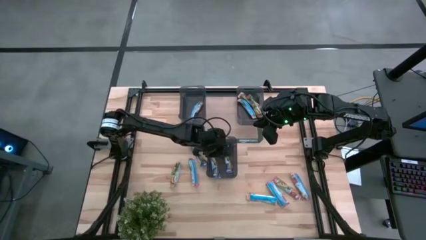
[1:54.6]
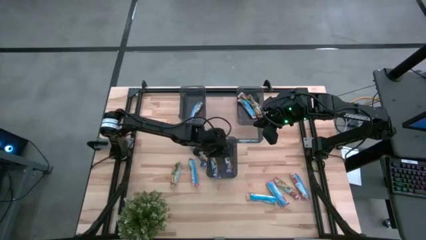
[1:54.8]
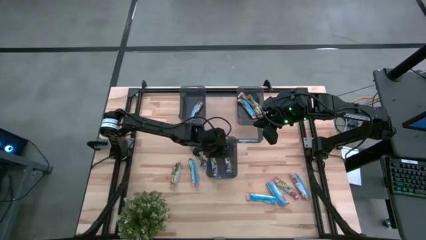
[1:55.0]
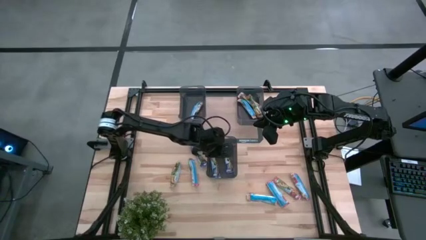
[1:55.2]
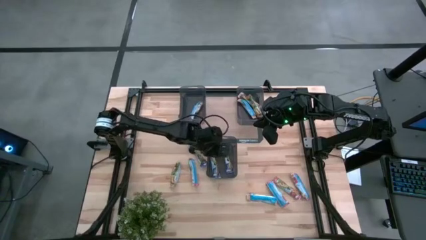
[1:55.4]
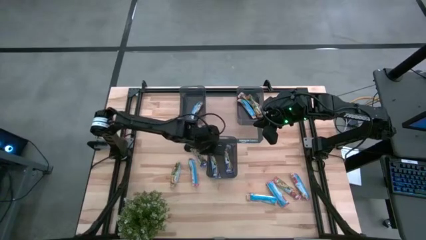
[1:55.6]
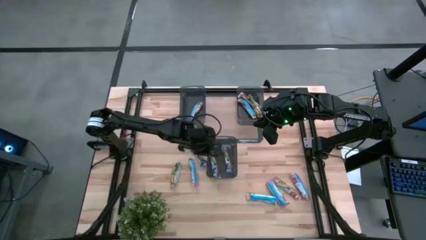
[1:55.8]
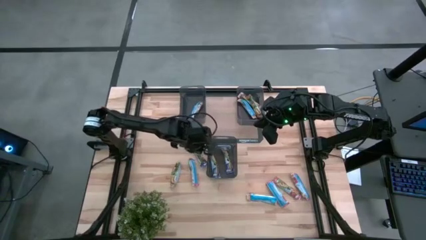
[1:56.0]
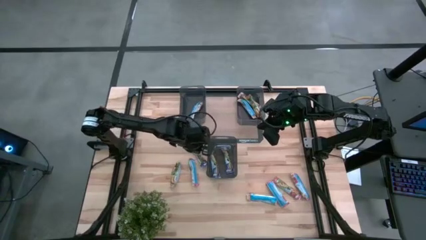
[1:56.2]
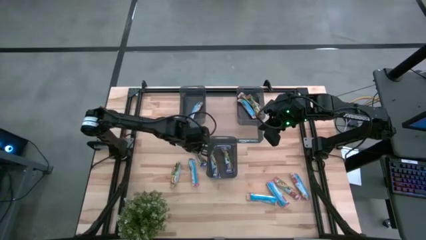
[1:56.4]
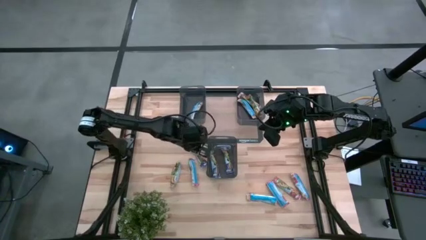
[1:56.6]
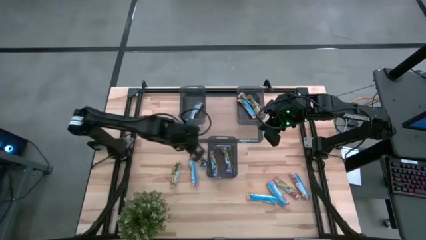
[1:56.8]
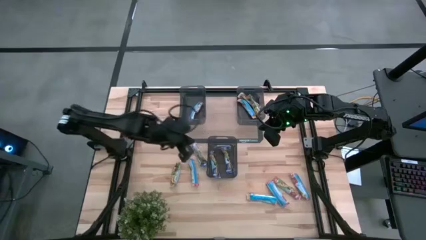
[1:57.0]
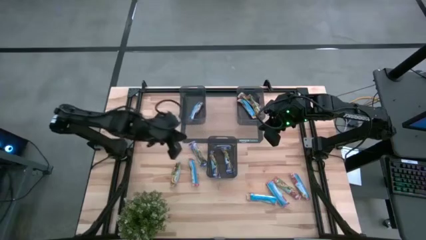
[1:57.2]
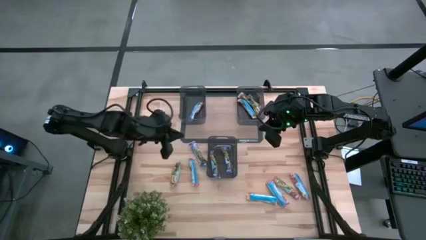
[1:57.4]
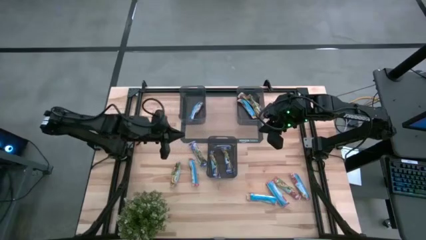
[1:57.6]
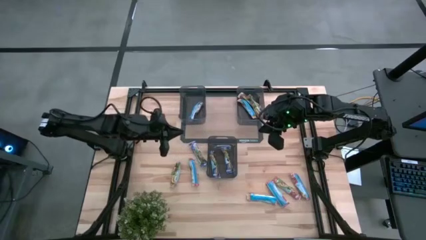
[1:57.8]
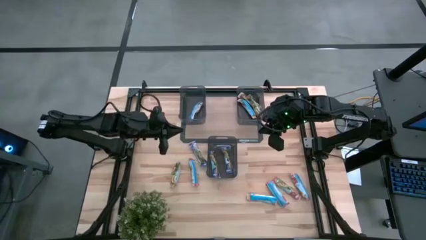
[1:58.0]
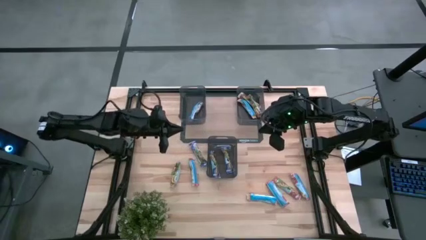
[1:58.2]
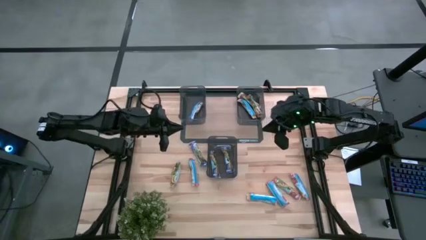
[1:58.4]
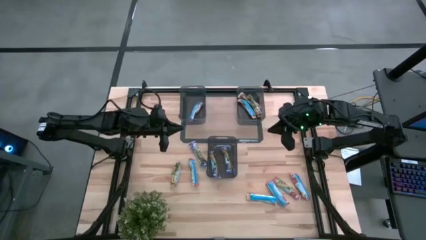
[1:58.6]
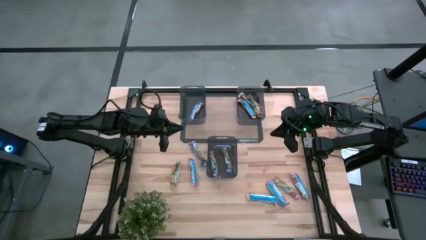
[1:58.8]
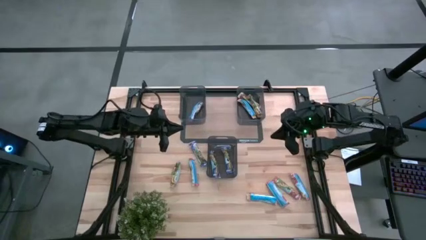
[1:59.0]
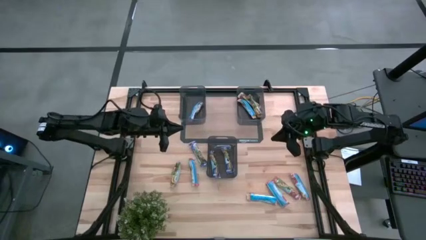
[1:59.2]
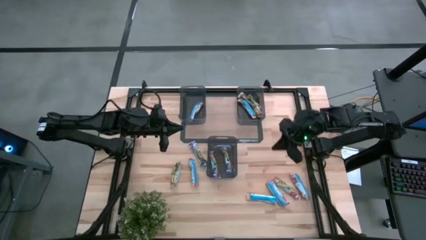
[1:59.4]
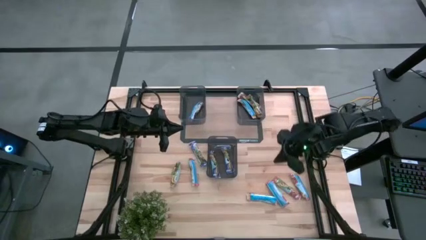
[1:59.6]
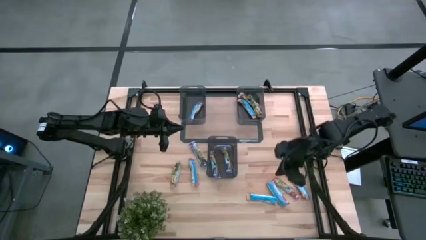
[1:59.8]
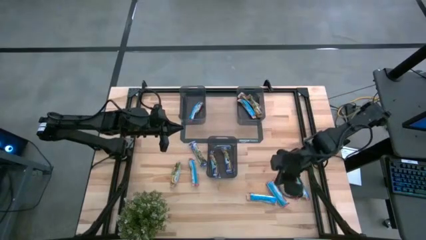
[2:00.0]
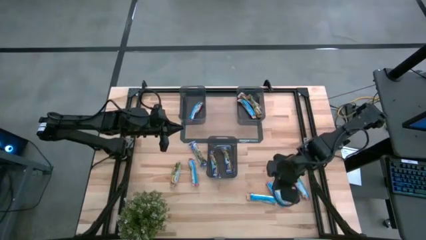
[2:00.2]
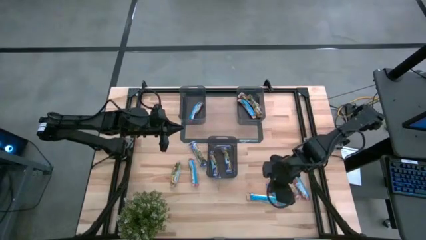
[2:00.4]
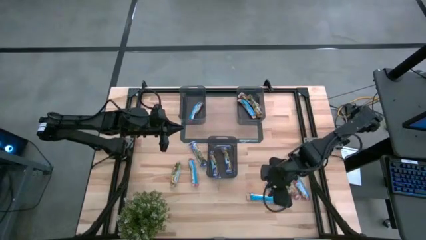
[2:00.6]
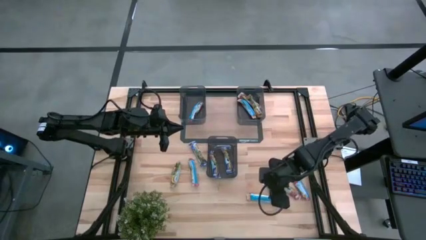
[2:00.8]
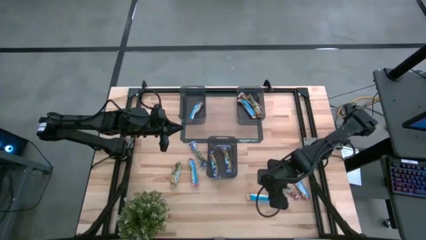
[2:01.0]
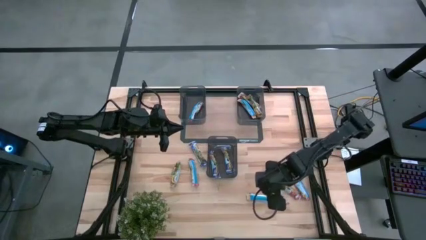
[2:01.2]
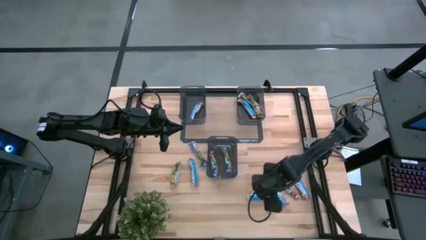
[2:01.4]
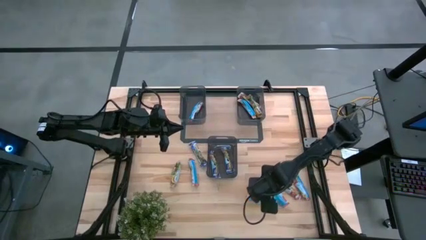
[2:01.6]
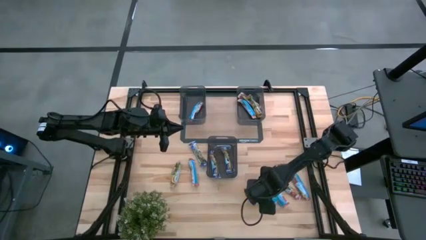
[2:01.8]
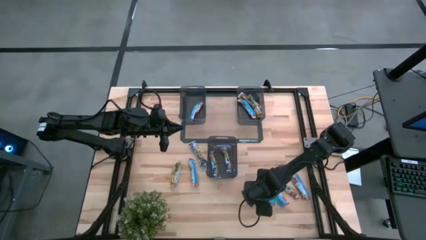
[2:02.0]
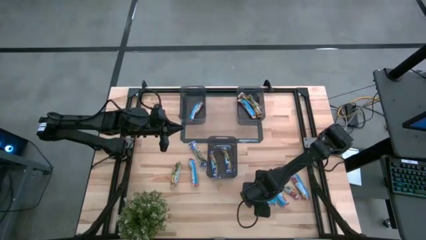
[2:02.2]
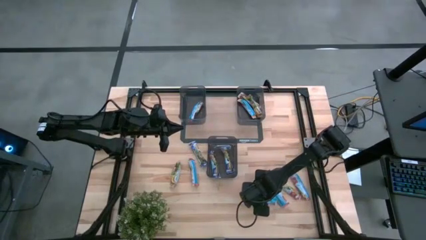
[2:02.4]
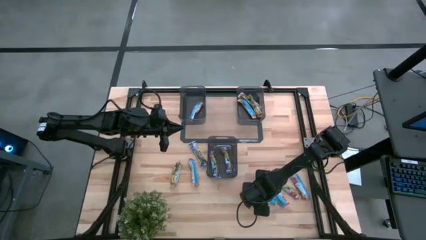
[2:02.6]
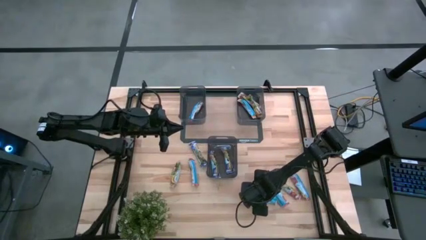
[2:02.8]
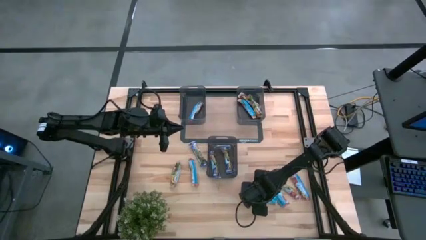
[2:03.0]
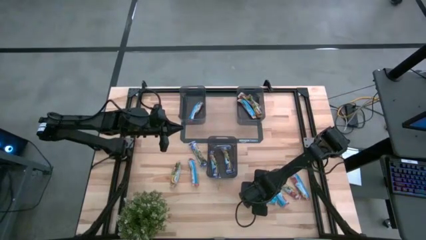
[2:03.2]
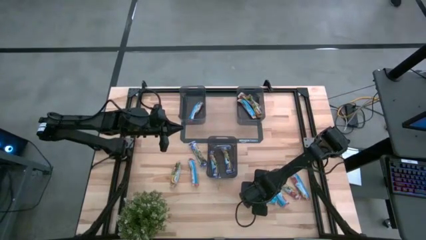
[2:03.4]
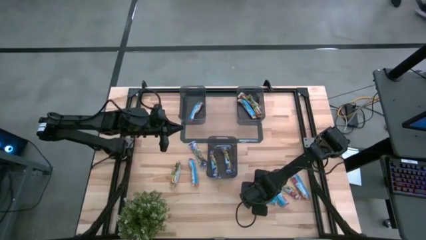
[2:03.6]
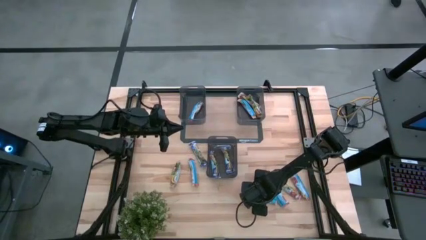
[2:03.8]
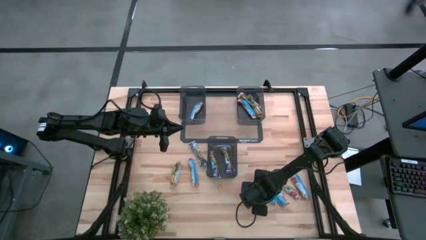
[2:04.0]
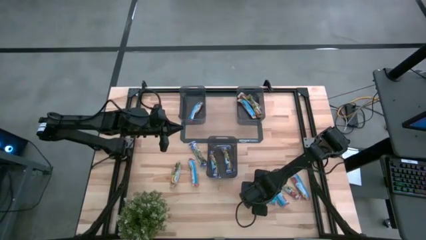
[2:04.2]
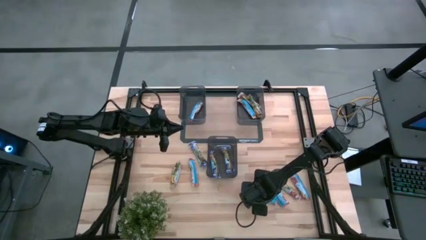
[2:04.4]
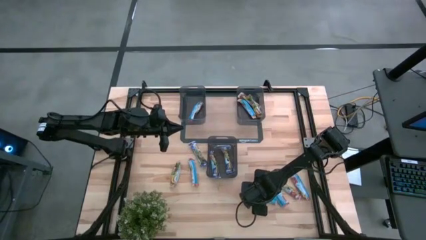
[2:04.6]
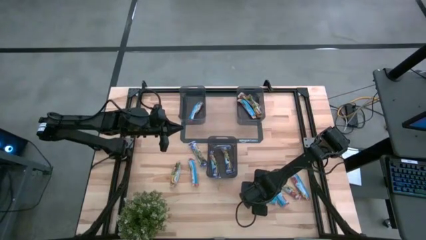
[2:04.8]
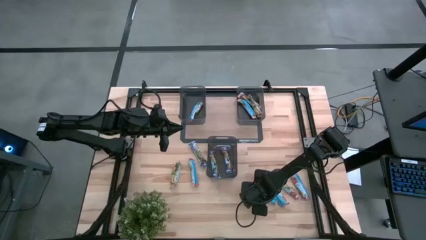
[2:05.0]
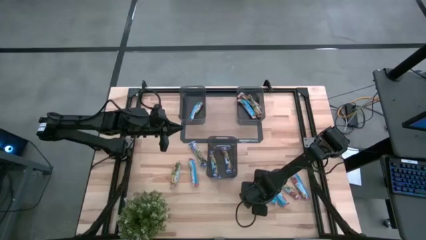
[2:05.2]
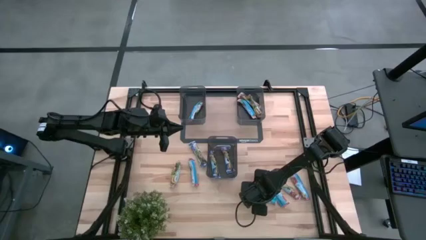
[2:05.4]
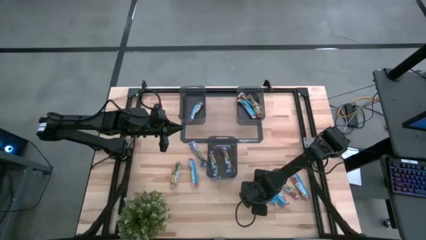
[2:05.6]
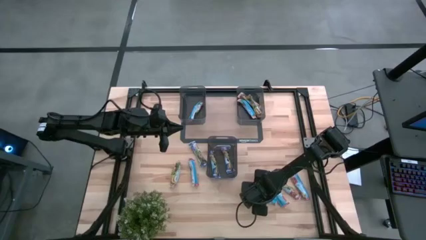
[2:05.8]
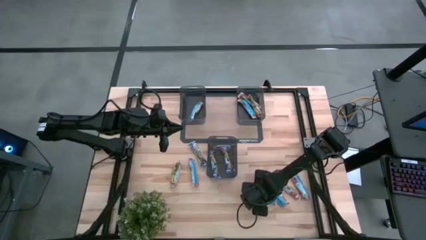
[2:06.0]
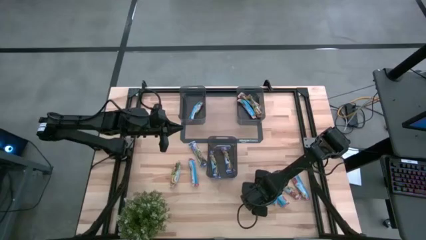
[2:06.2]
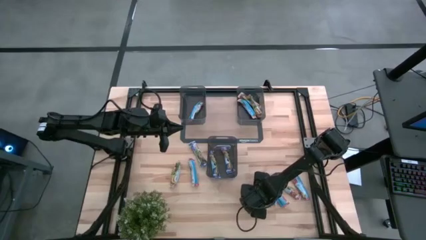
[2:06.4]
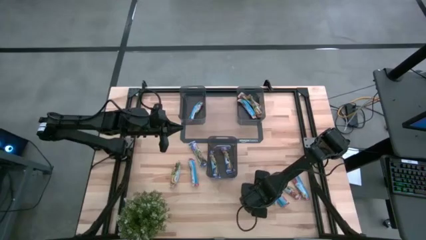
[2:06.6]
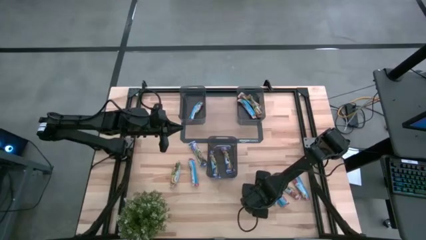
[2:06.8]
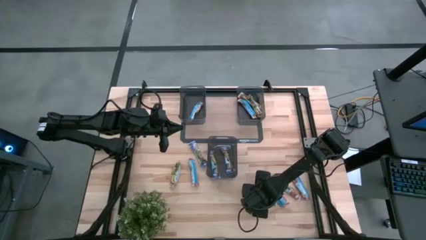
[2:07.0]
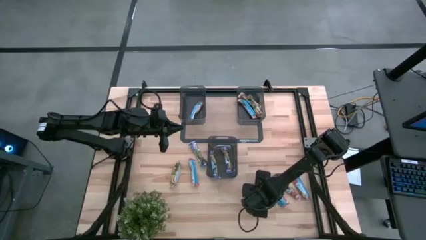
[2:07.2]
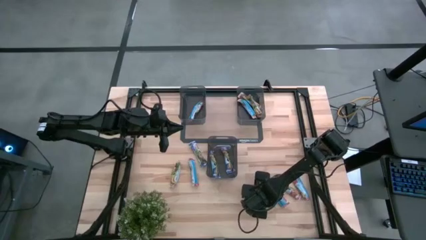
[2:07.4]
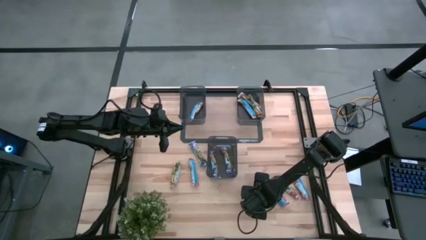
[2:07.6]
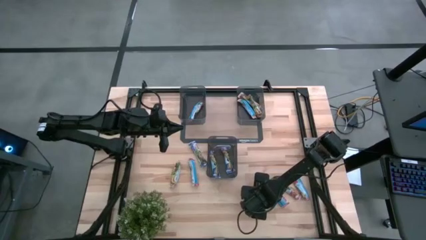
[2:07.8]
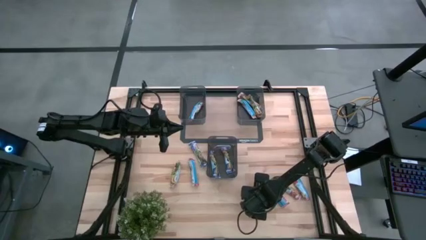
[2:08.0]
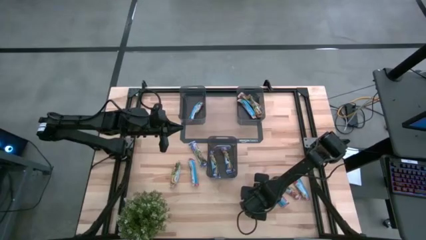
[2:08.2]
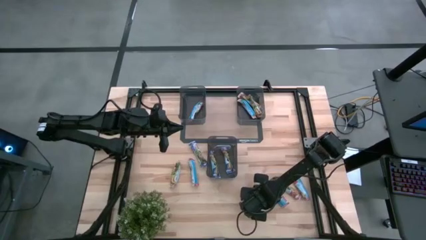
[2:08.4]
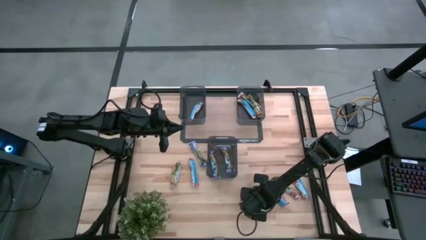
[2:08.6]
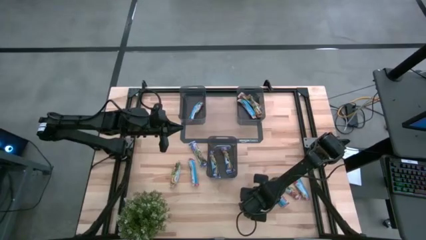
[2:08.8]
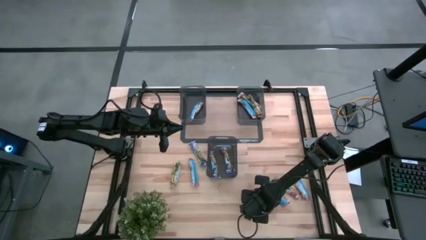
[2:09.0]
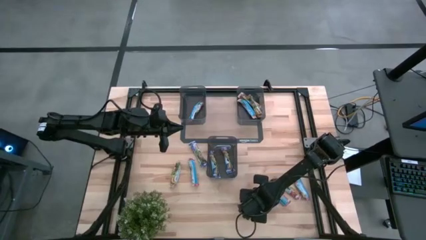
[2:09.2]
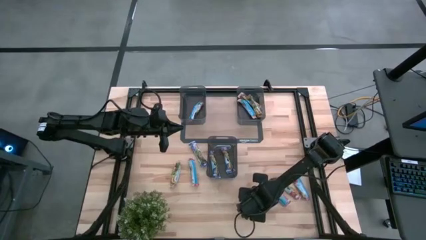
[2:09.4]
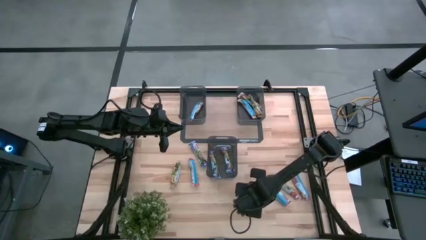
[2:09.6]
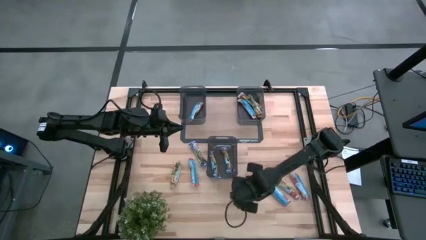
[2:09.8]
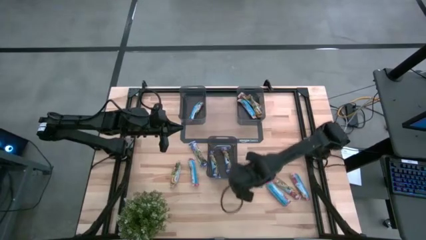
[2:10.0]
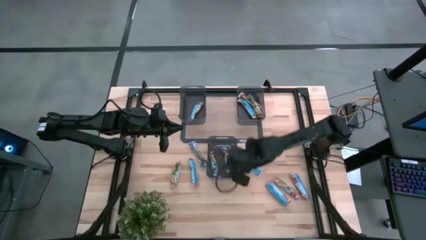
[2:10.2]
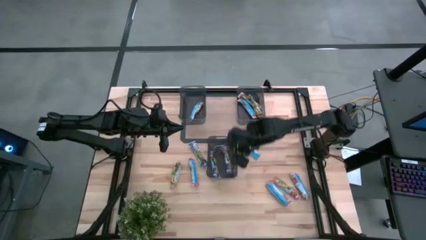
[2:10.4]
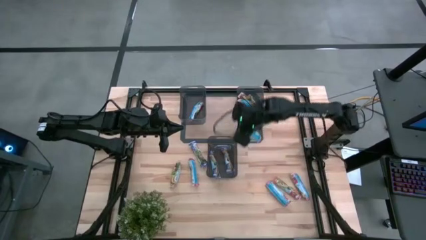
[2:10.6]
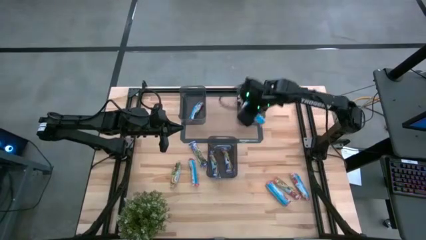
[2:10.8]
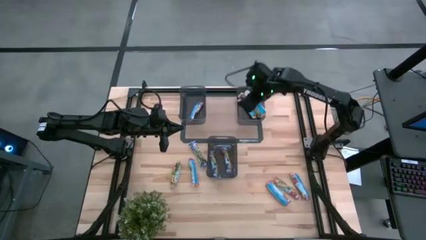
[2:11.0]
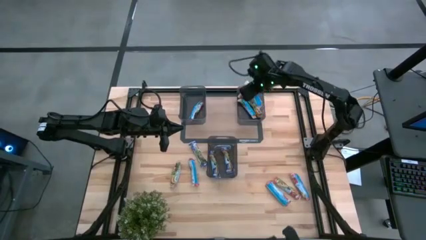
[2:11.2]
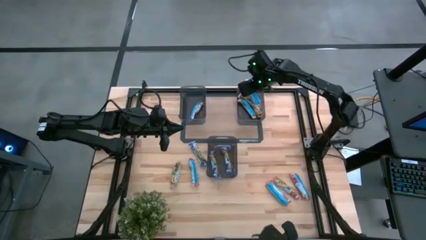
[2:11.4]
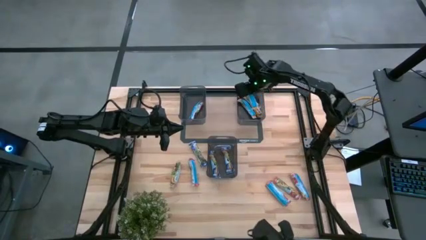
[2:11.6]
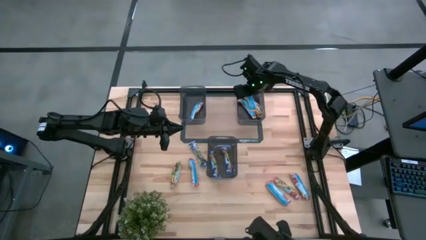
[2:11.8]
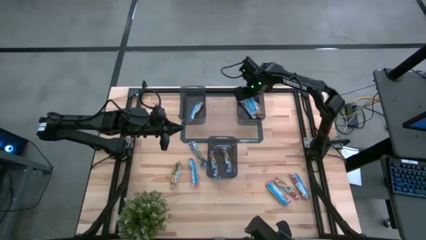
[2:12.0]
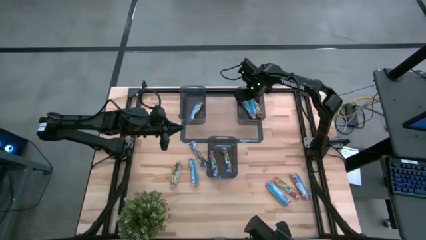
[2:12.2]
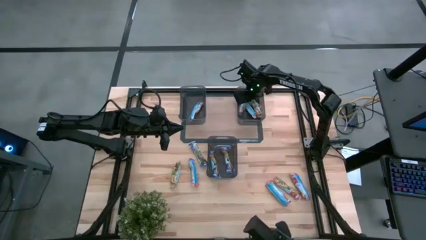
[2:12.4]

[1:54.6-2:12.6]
Task: Pick and place Granola Bars by type
Put the yellow granola bar into the right black bin
